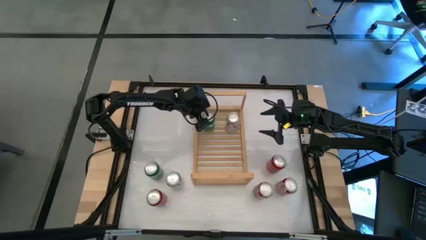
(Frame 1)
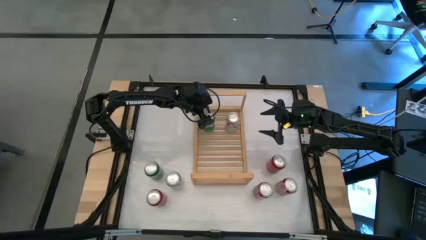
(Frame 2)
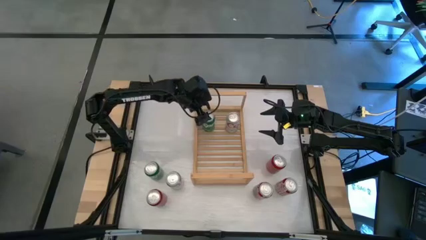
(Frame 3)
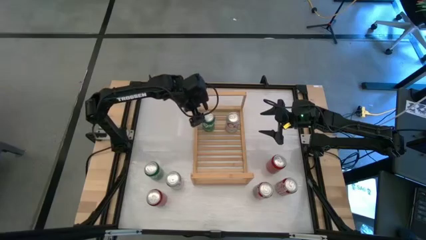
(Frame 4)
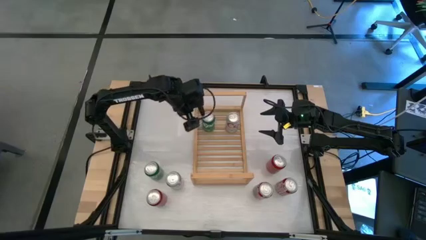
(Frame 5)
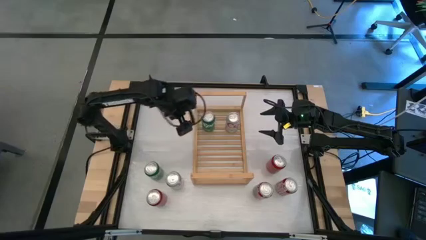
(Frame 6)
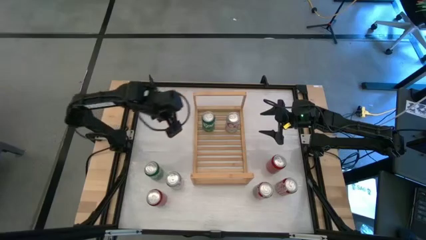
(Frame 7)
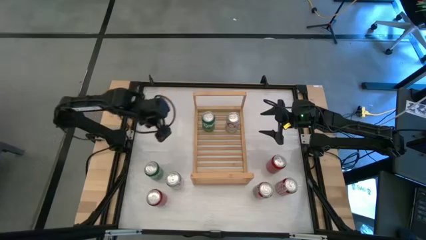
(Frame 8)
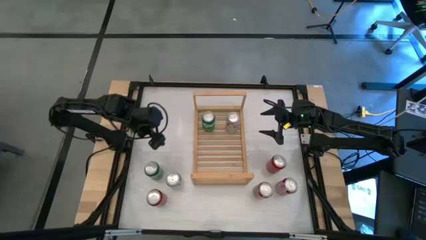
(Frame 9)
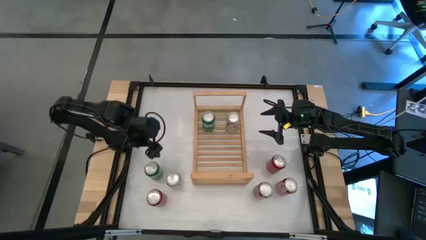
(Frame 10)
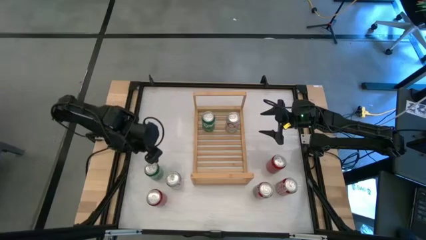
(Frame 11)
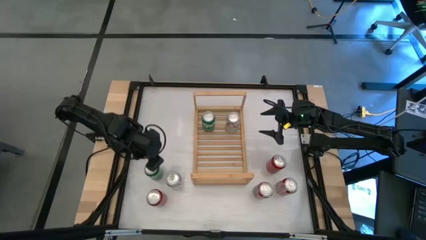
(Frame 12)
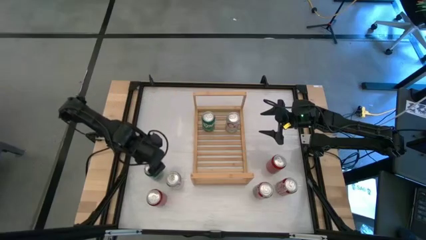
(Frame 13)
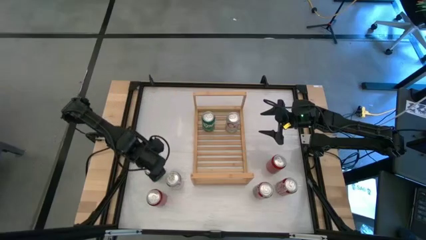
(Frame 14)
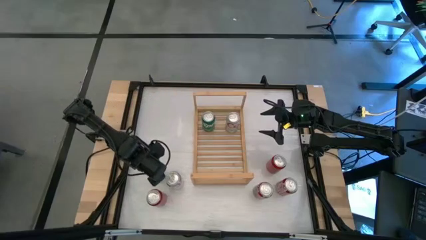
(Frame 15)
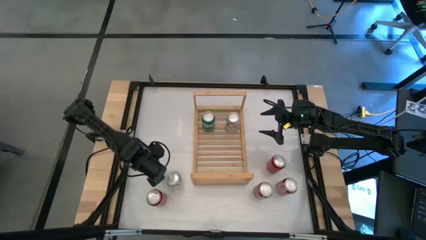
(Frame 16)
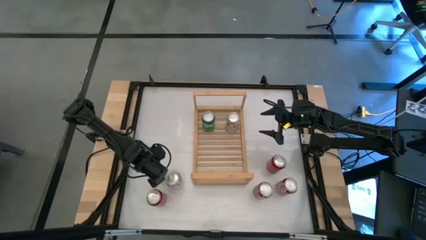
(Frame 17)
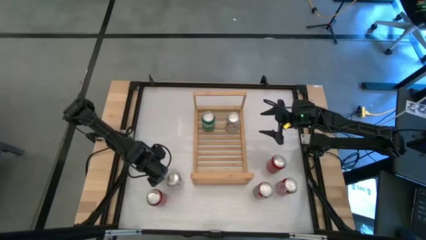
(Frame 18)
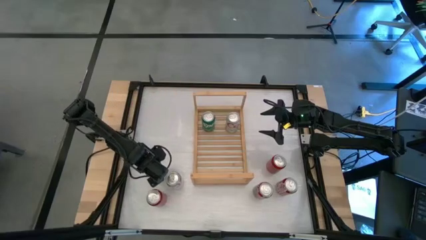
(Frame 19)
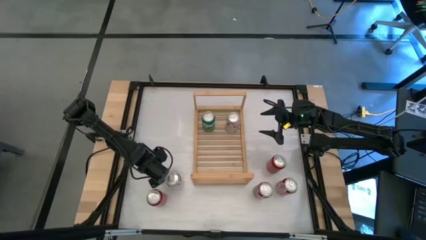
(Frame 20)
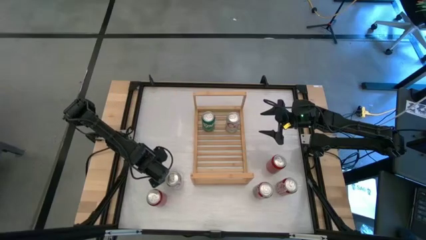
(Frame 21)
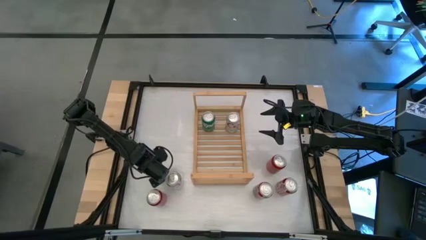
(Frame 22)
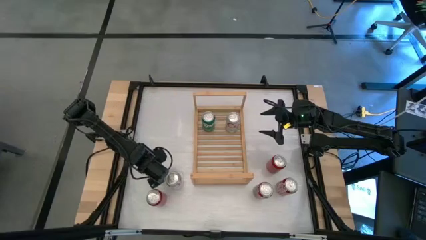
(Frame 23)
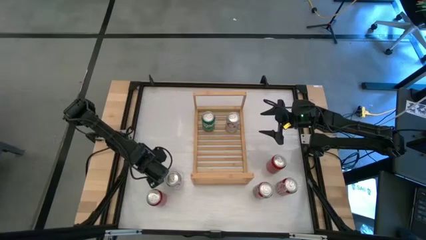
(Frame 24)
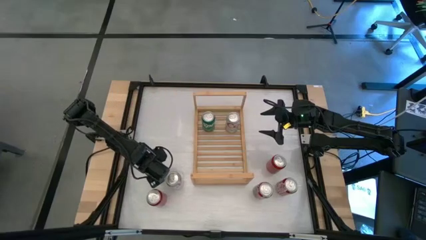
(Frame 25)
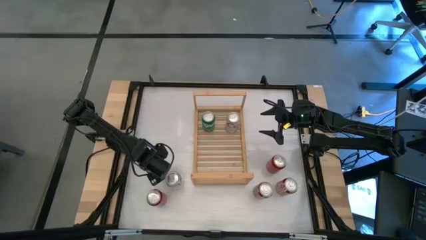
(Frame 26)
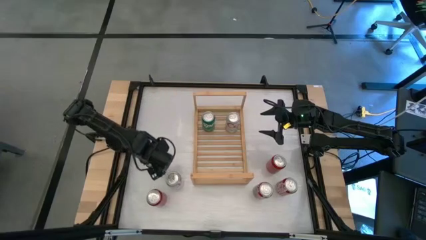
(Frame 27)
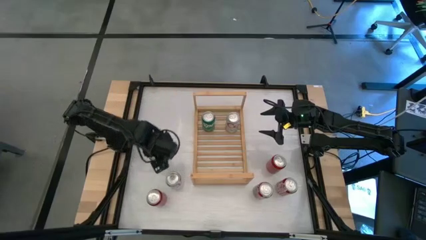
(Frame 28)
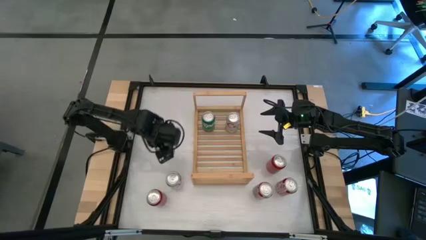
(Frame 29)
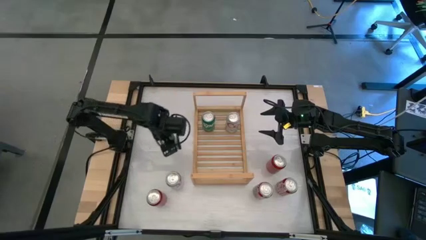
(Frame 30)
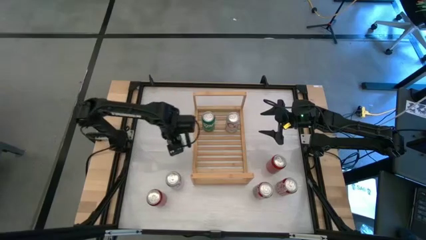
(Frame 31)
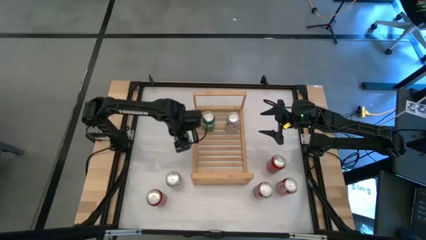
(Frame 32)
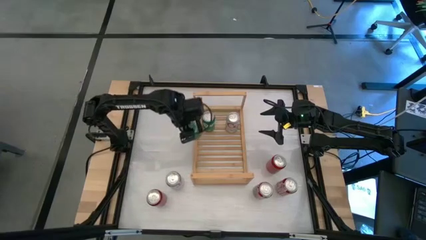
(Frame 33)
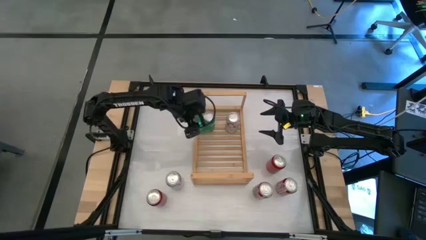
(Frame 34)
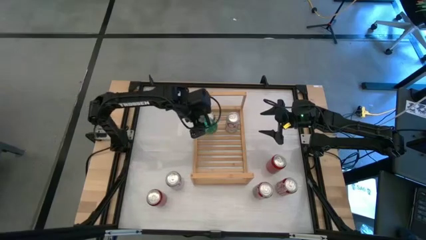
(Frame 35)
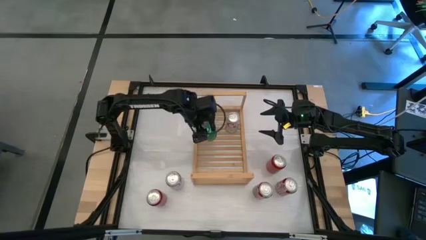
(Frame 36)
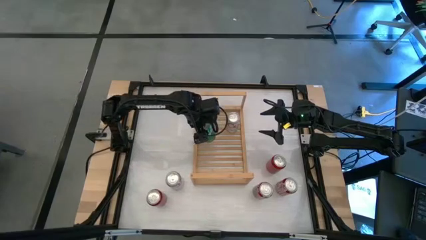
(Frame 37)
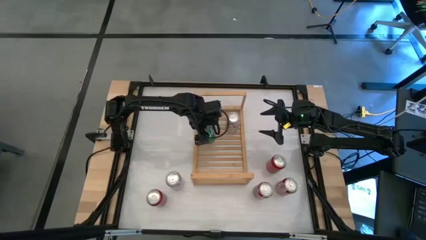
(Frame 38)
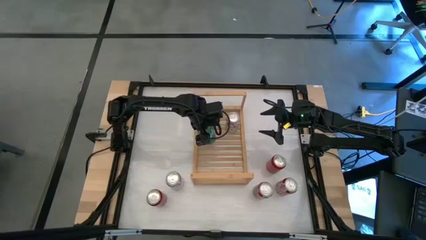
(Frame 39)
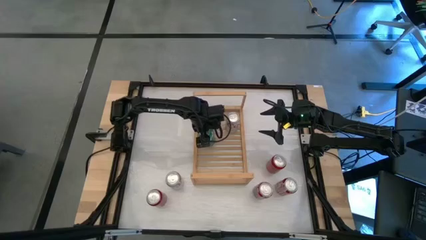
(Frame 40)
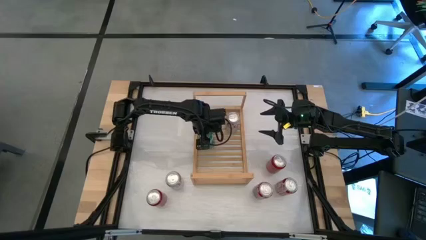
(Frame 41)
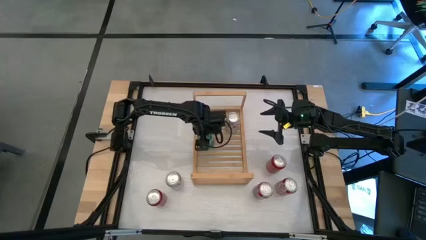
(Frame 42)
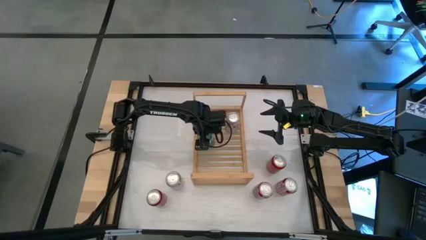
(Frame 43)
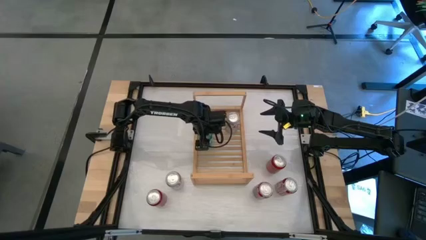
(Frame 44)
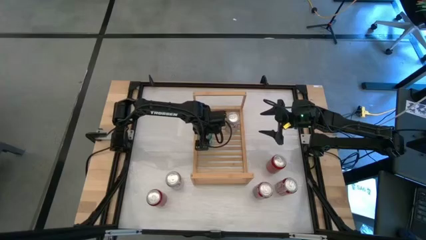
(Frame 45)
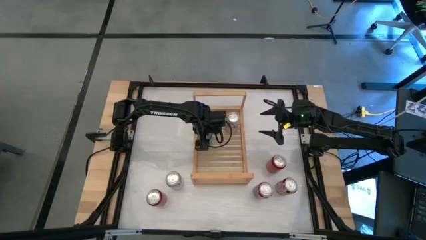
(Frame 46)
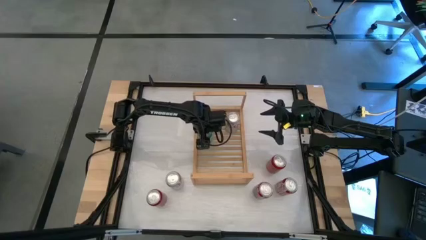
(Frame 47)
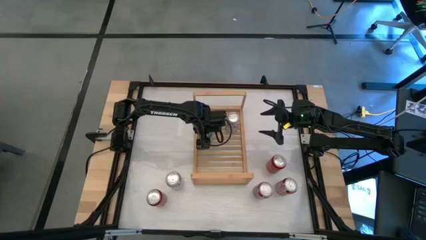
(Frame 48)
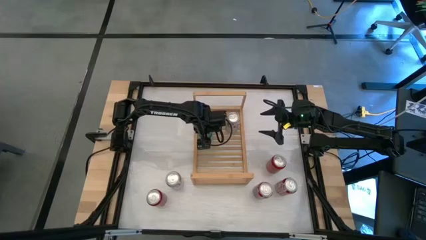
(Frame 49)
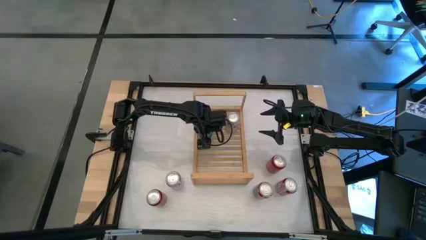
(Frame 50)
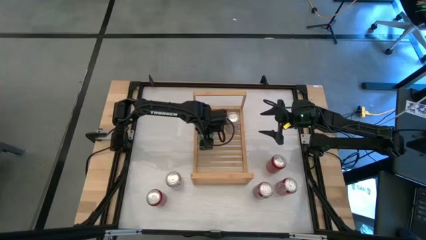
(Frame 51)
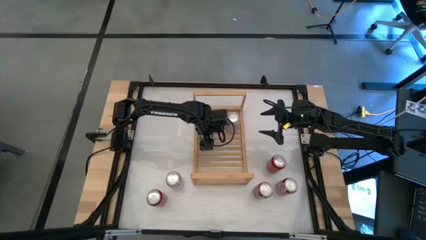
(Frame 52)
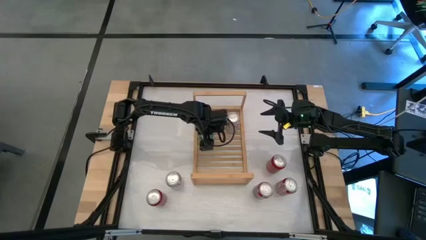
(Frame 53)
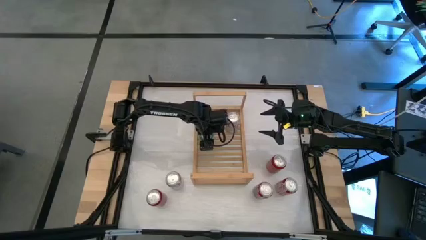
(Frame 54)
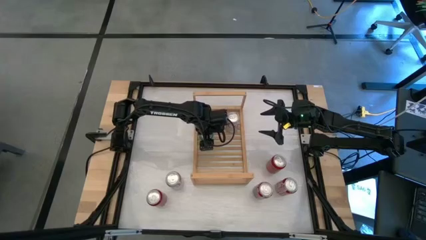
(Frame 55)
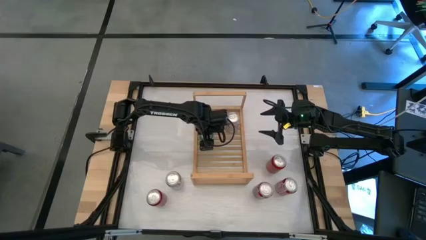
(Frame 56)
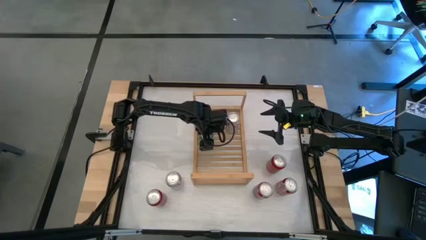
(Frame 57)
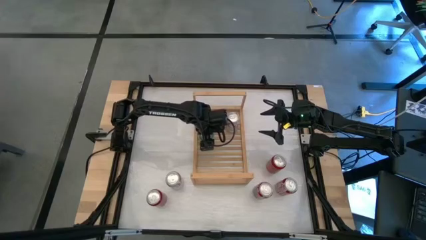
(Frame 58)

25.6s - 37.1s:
Task: Place canned beverage on shelf
Put the green soda can on the shelf

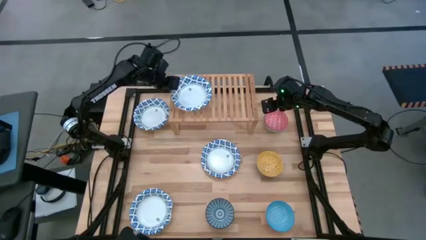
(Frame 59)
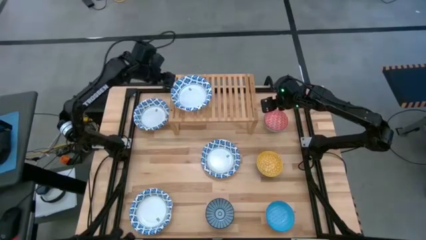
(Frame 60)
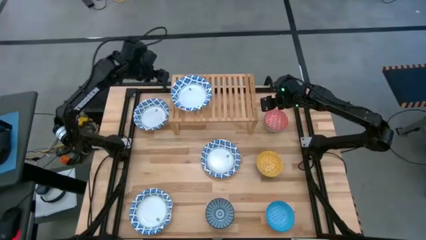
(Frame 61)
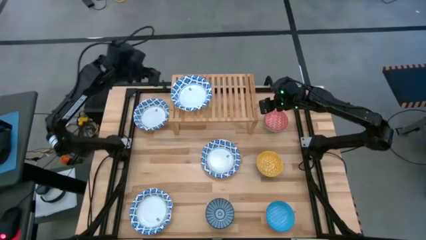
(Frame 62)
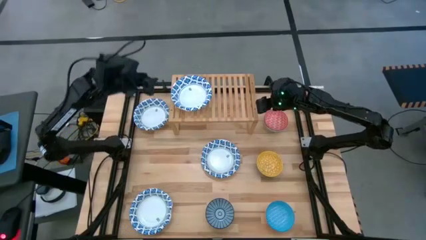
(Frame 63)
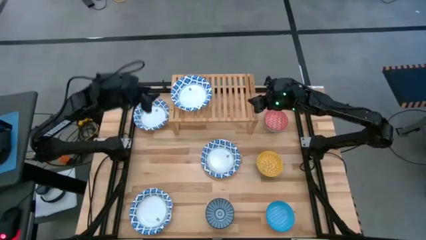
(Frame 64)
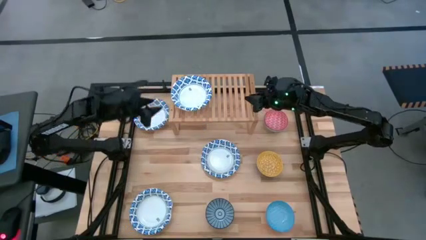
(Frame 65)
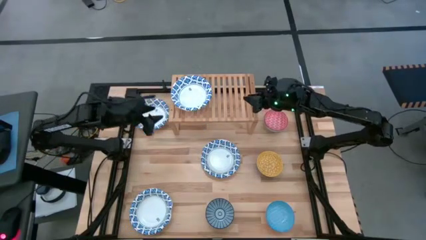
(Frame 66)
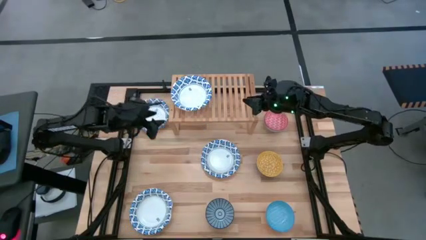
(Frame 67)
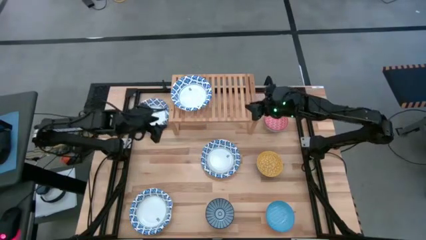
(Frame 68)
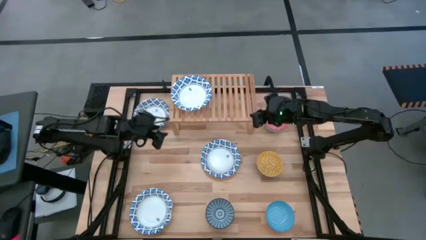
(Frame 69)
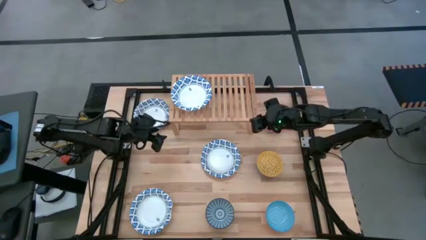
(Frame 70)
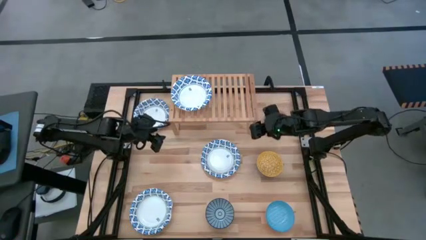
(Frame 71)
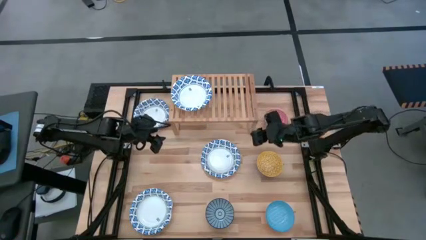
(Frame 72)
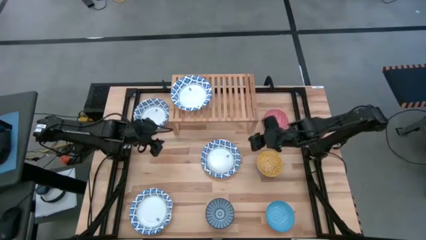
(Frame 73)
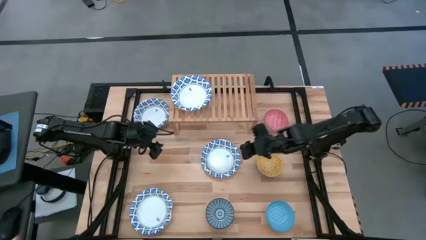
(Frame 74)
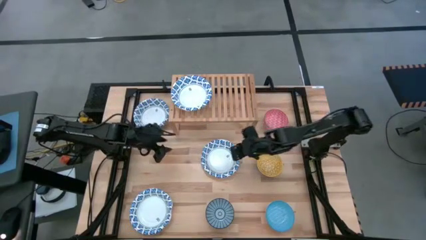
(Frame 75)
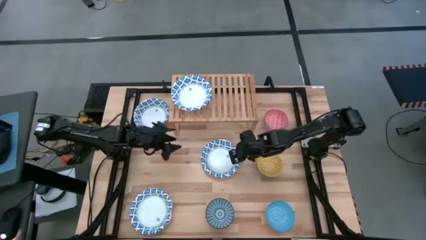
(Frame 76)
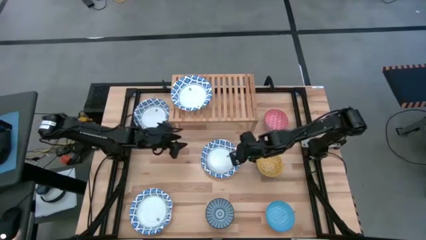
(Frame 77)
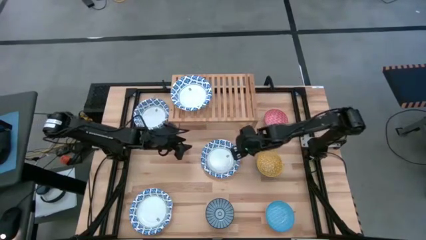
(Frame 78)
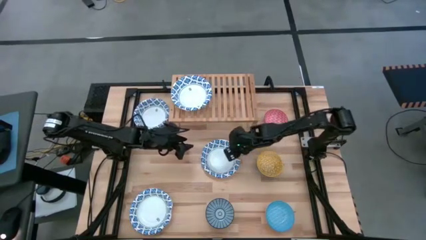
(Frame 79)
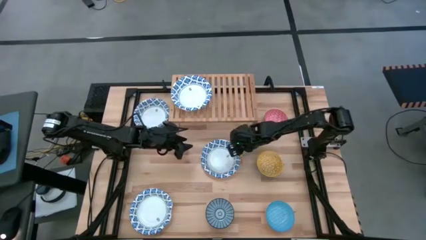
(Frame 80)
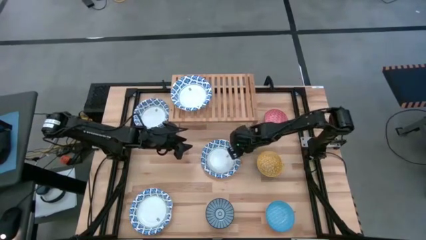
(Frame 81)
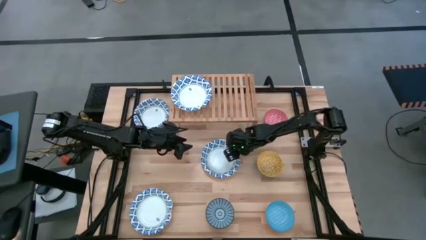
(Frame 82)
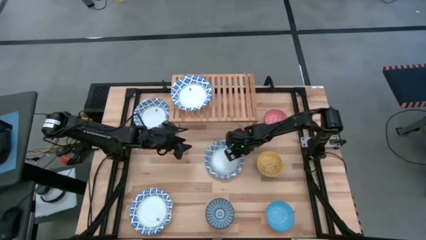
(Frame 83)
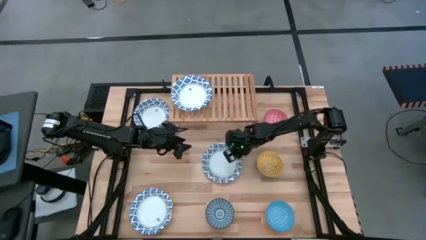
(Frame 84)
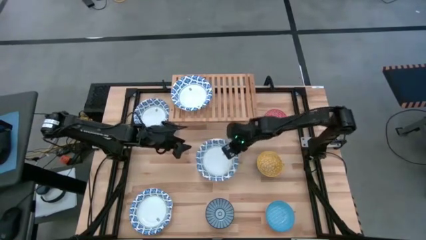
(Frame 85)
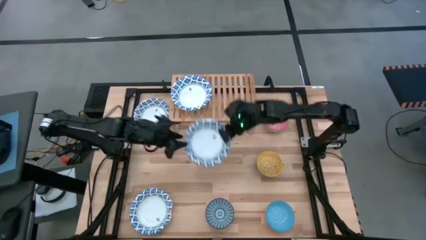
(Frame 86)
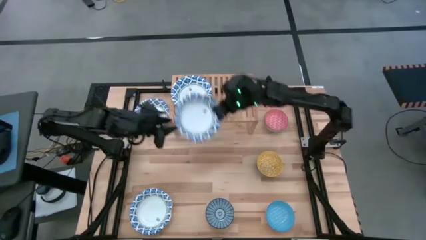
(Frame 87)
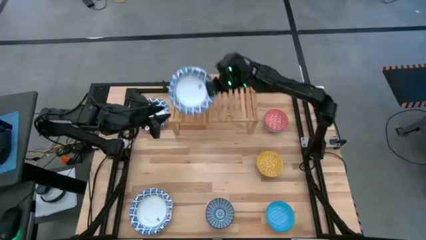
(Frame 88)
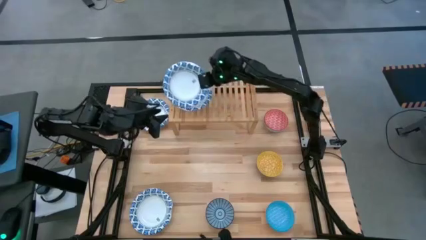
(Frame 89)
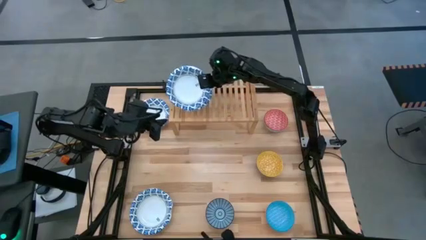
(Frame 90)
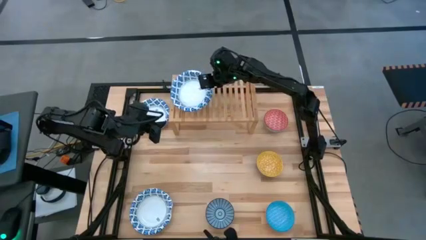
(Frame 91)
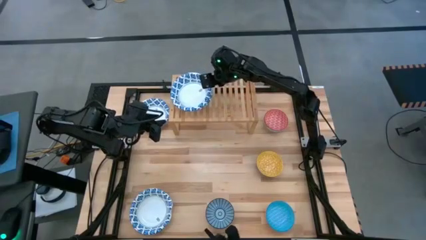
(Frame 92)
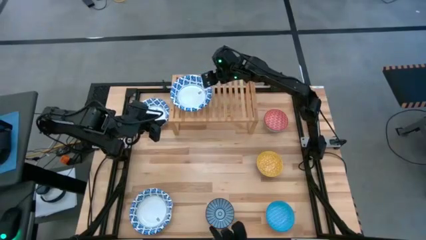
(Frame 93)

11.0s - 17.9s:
Task: Place and stack bowls onto a shelf
Stack the big white bowl on top of the big white bowl
